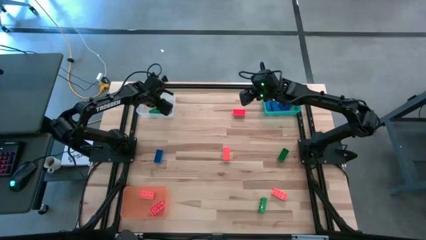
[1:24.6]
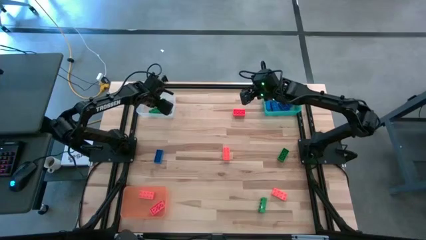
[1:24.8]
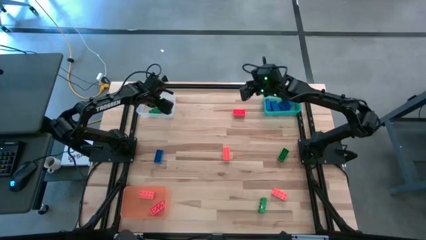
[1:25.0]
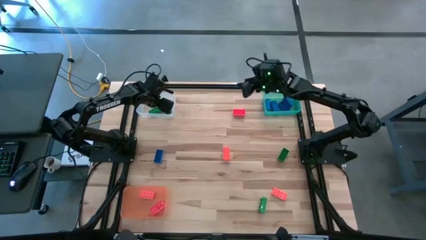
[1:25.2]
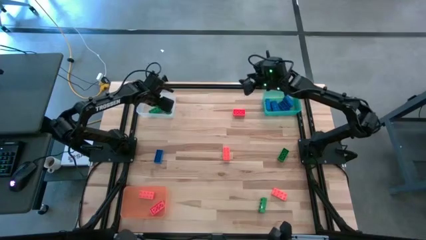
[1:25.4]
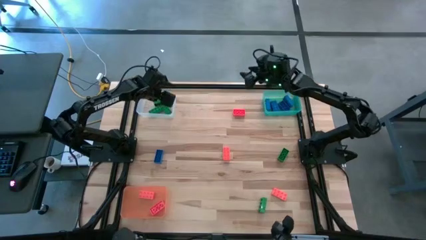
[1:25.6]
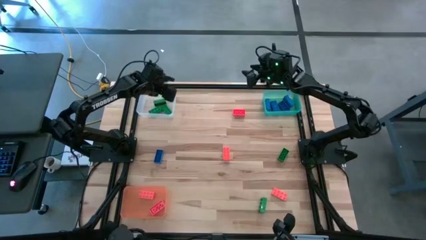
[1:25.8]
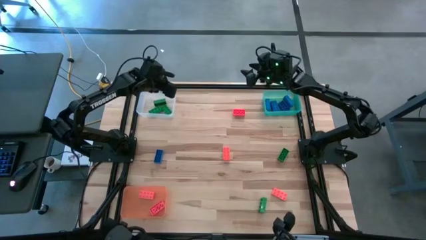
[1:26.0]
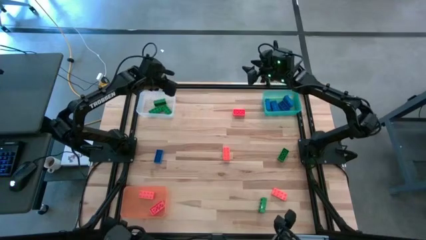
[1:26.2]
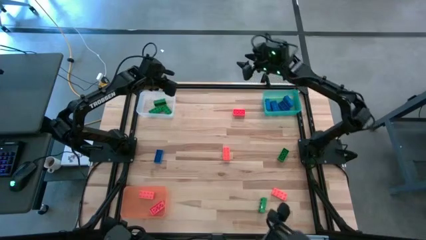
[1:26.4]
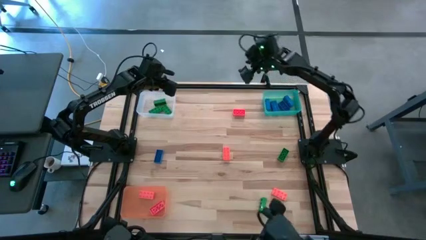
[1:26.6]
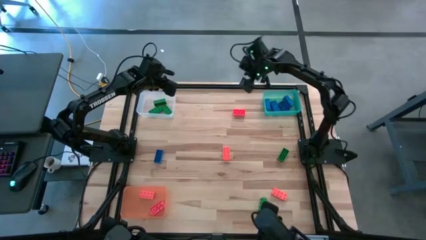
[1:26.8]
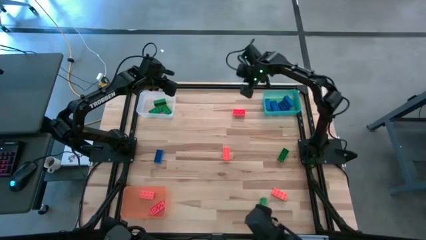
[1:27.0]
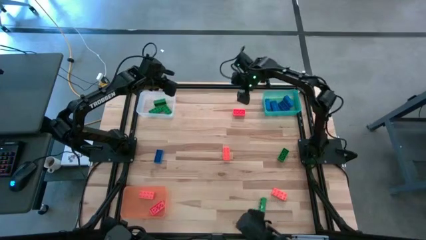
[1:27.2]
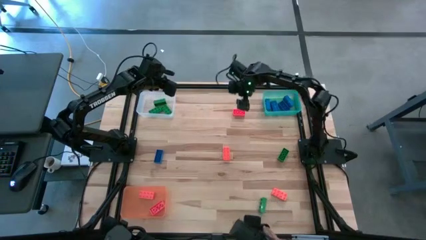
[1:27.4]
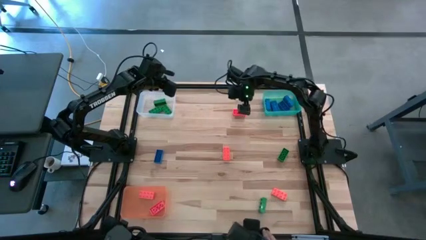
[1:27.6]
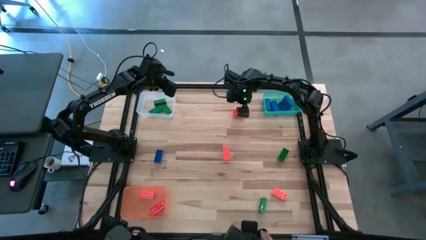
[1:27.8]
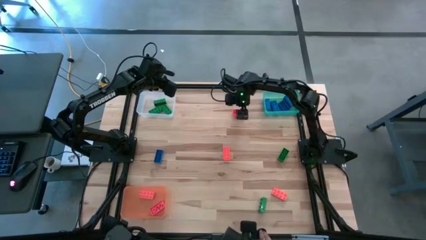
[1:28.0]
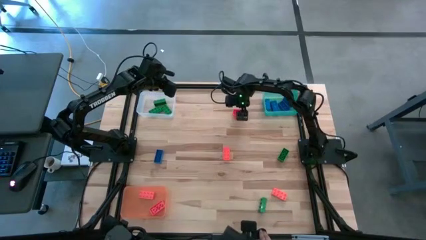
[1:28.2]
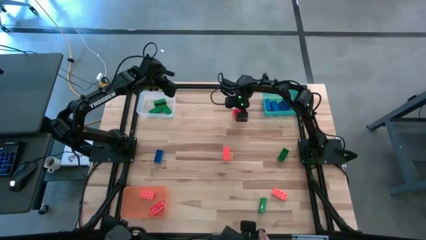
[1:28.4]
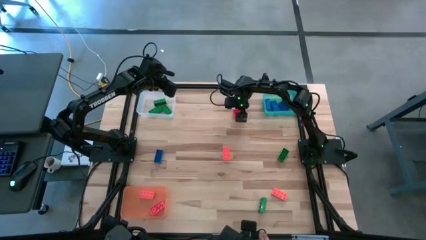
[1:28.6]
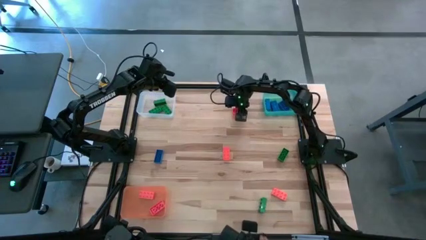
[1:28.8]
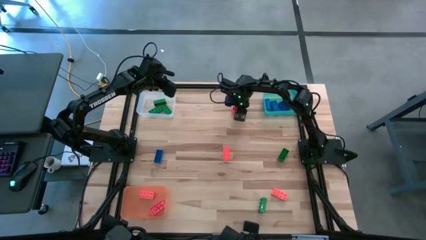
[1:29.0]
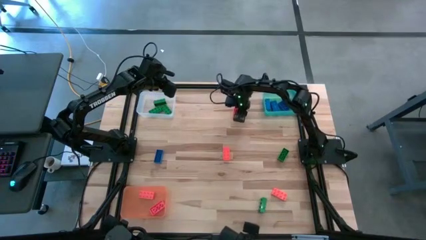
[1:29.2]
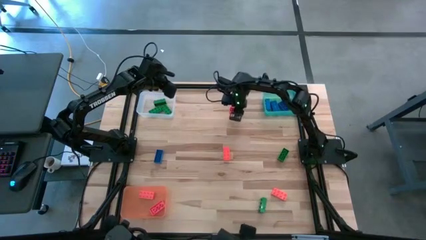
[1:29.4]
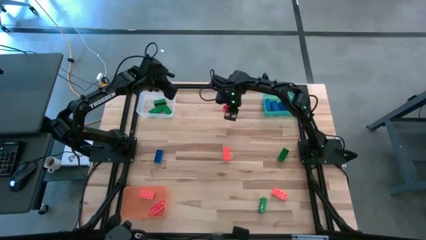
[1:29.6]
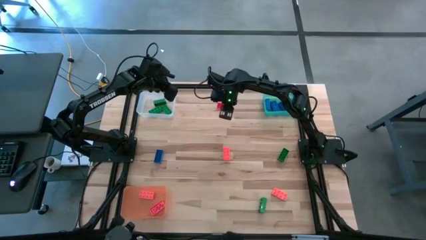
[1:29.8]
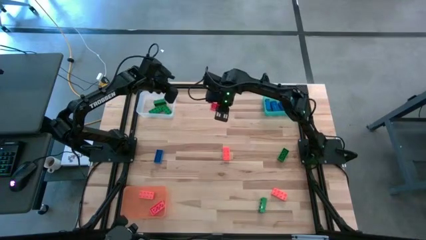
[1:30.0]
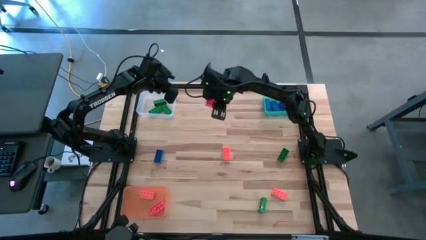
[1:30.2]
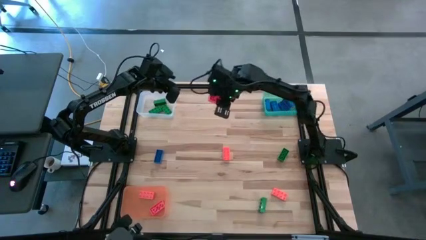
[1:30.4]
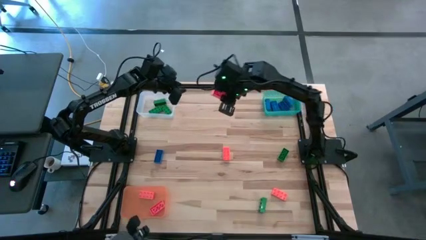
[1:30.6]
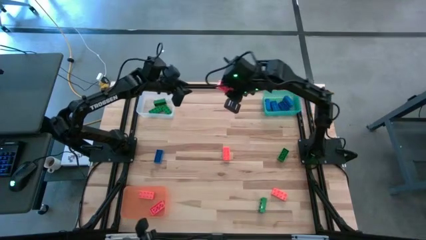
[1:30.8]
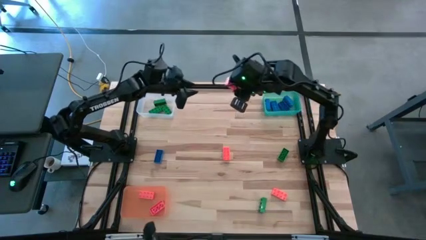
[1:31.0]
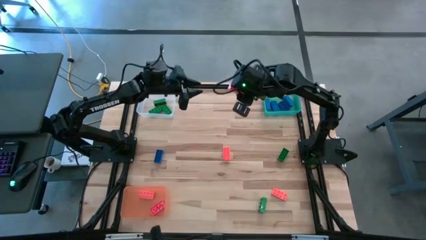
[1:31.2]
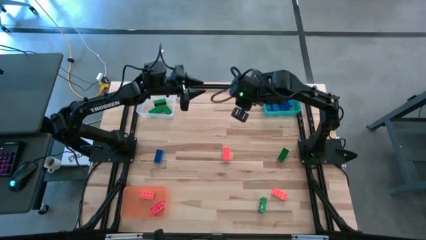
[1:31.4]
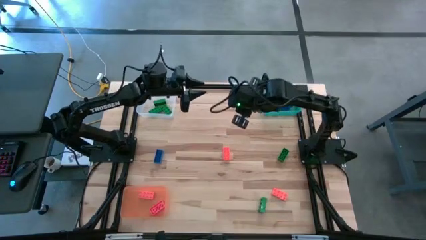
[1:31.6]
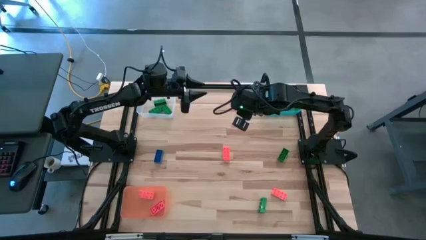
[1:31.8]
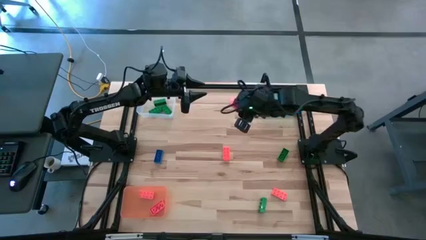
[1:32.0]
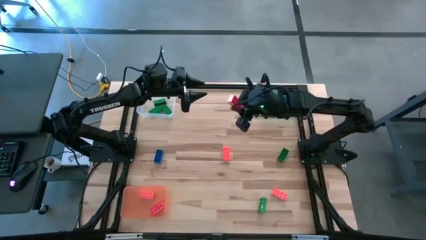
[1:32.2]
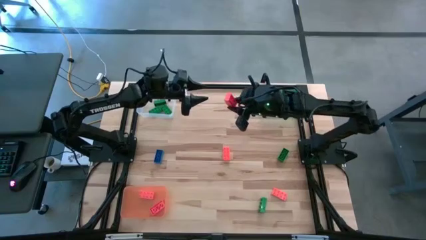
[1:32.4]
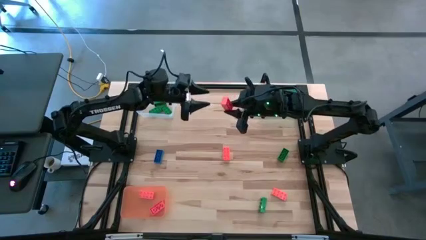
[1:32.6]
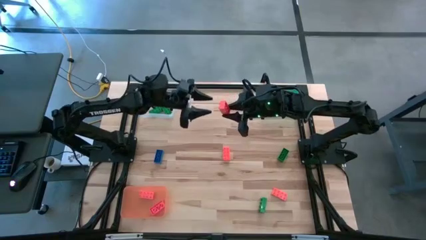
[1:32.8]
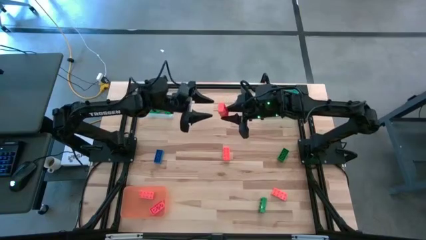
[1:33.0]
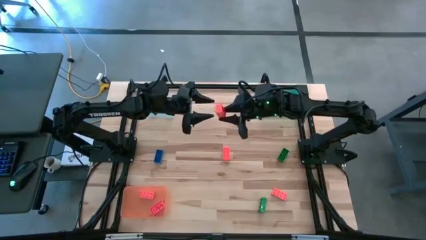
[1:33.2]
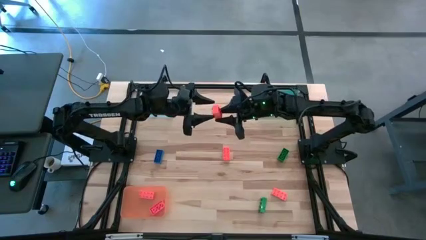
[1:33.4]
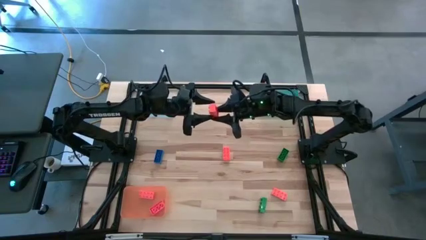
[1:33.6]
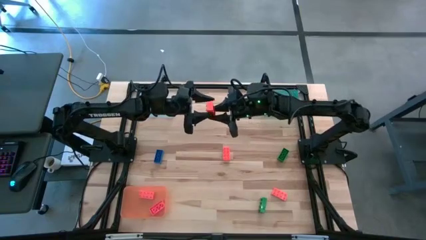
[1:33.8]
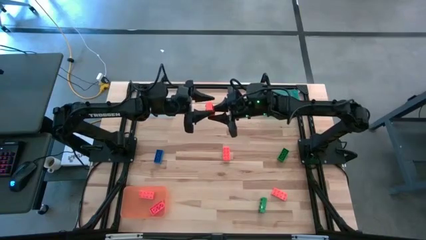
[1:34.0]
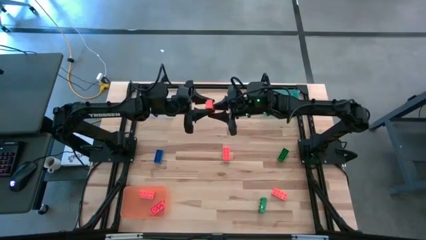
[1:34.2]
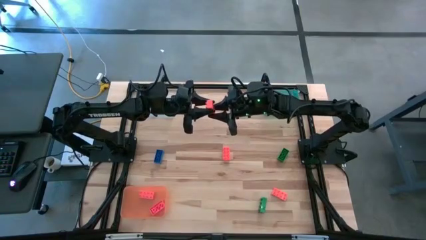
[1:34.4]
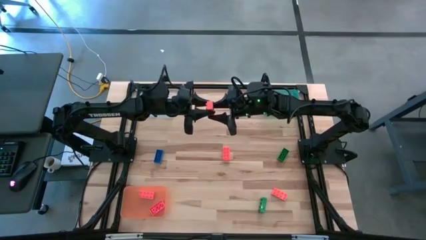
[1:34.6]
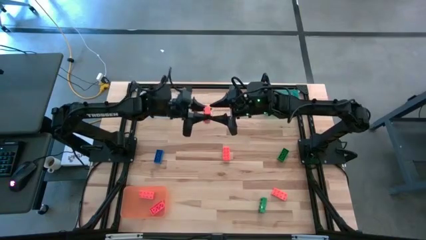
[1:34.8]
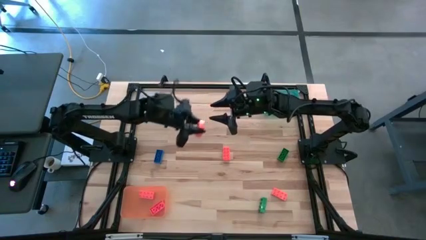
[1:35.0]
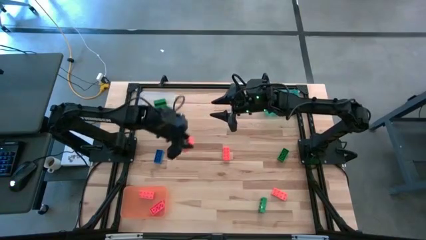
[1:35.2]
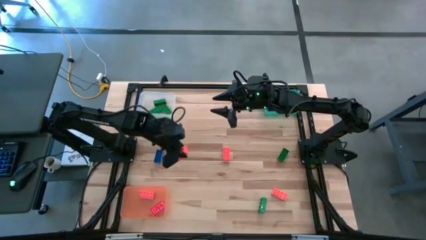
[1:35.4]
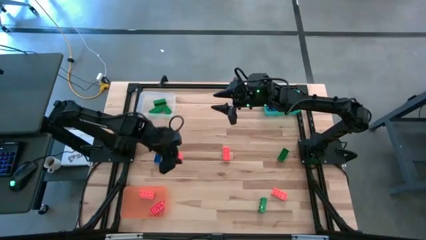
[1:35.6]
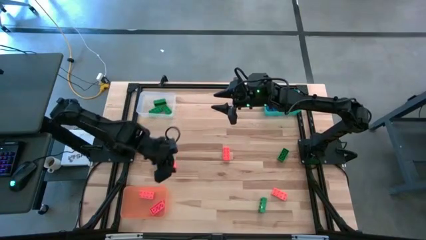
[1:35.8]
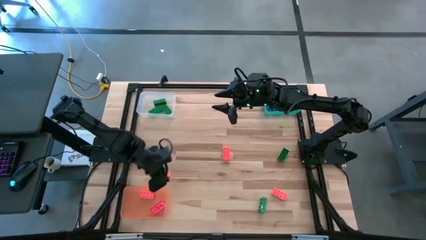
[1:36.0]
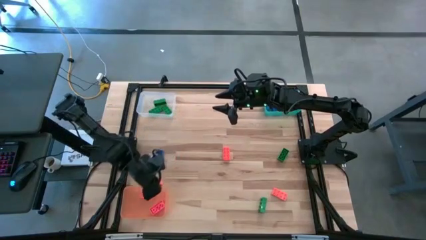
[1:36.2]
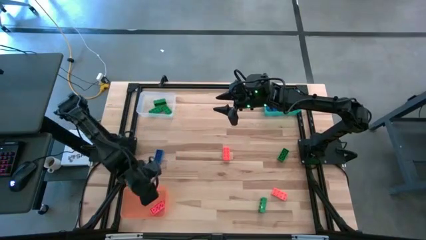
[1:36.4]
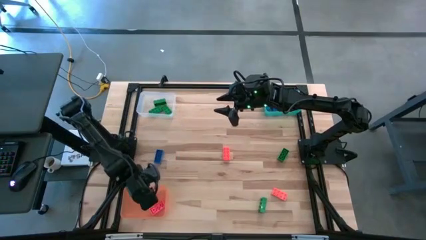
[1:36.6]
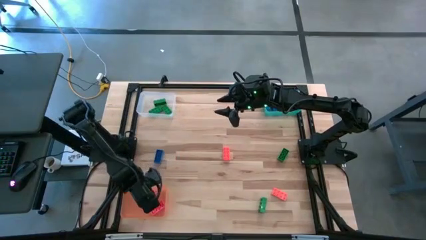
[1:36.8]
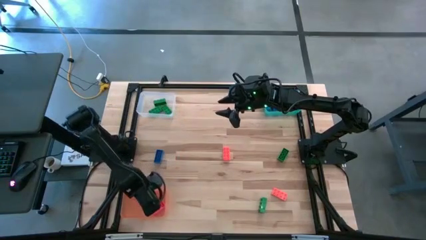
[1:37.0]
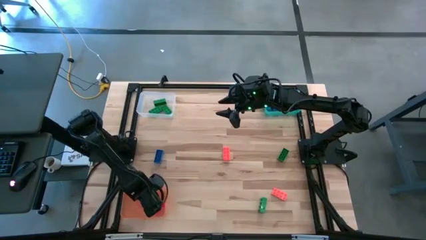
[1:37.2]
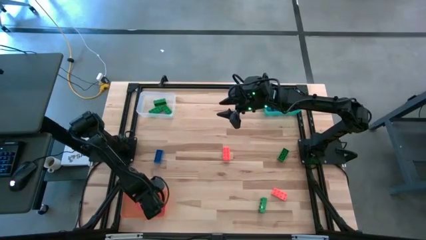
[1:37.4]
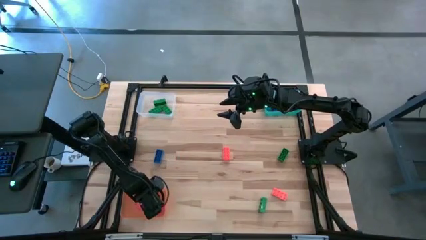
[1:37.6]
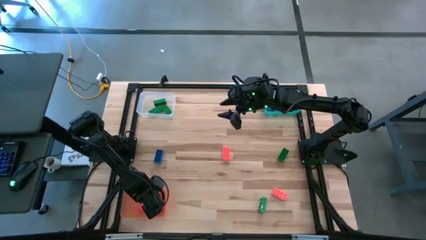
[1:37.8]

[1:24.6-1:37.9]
Task: Sort & place blocks by color
Put the orange game piece into the orange bin
